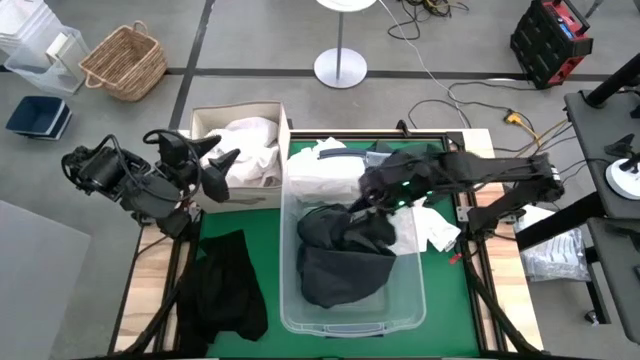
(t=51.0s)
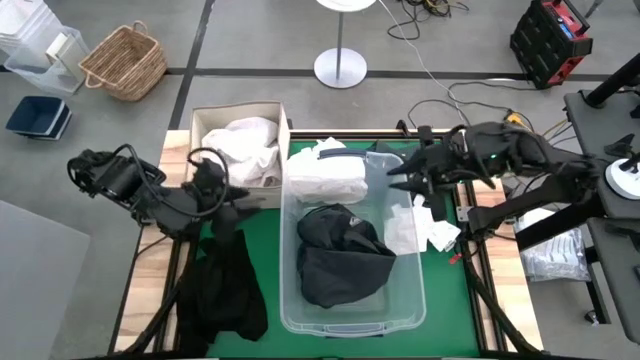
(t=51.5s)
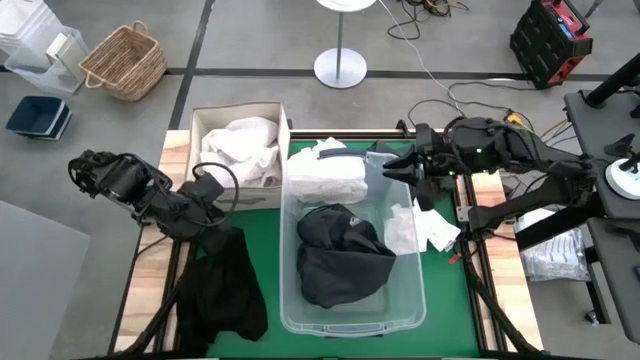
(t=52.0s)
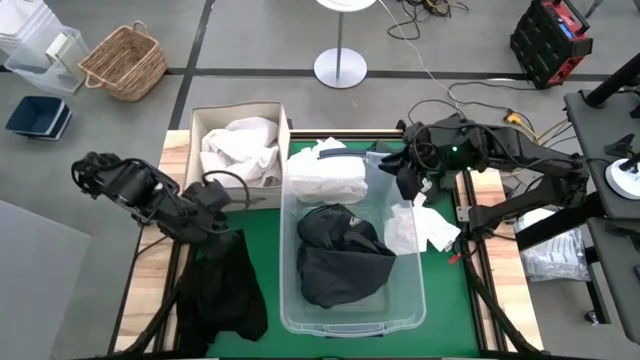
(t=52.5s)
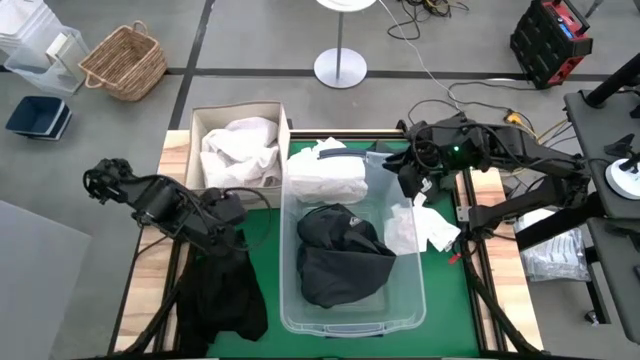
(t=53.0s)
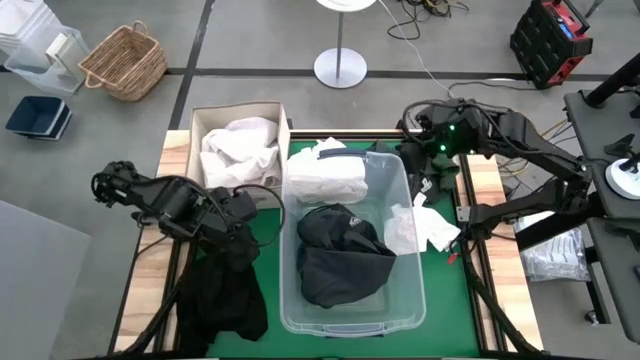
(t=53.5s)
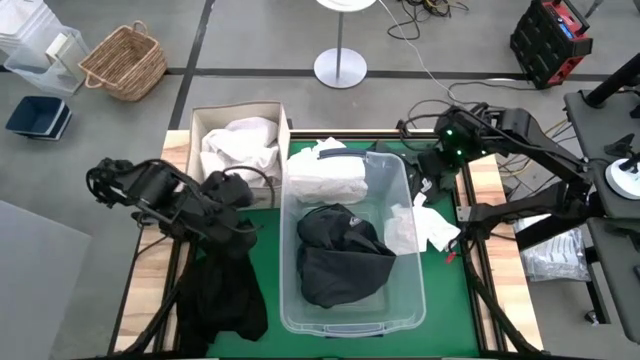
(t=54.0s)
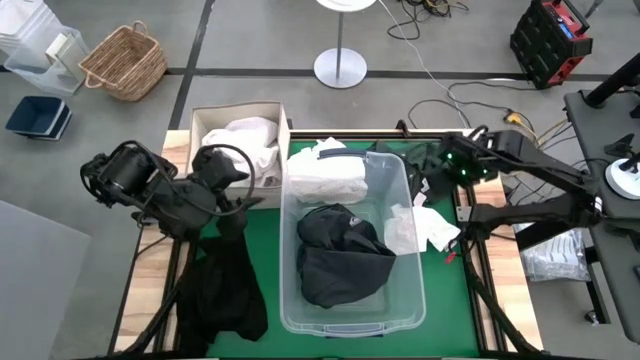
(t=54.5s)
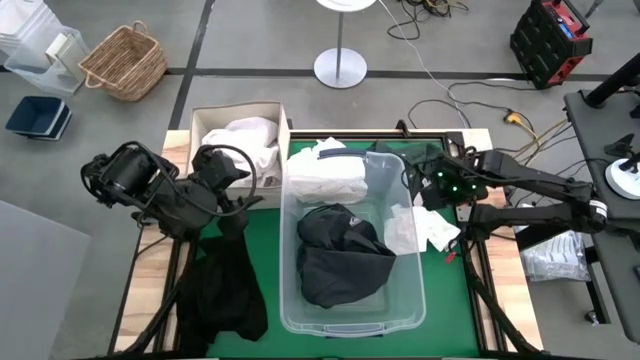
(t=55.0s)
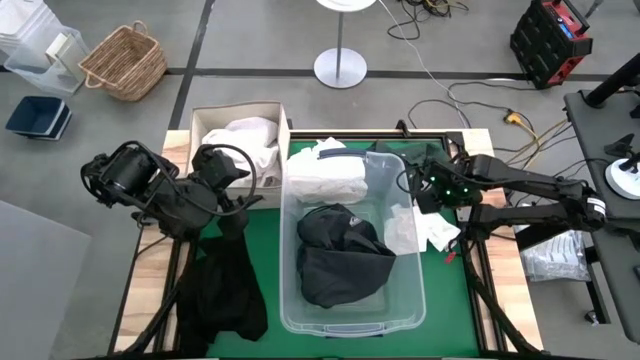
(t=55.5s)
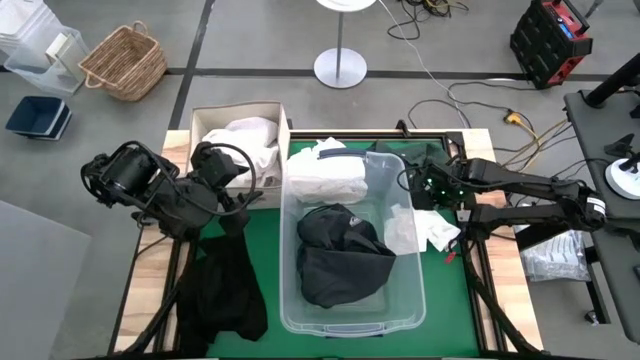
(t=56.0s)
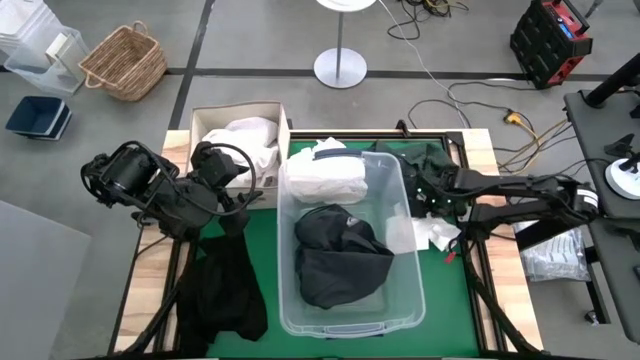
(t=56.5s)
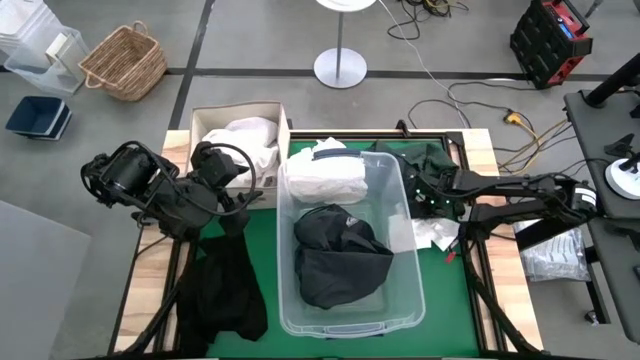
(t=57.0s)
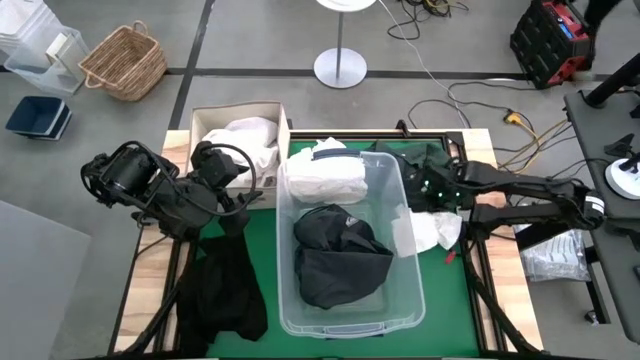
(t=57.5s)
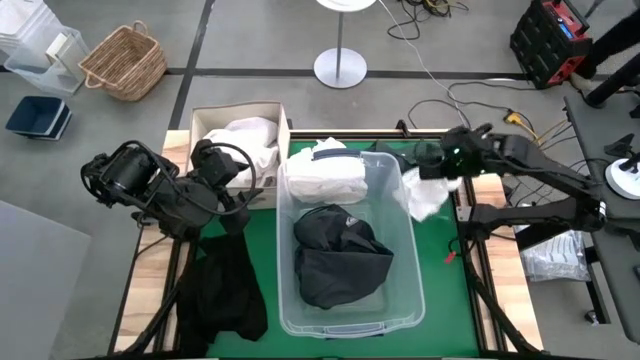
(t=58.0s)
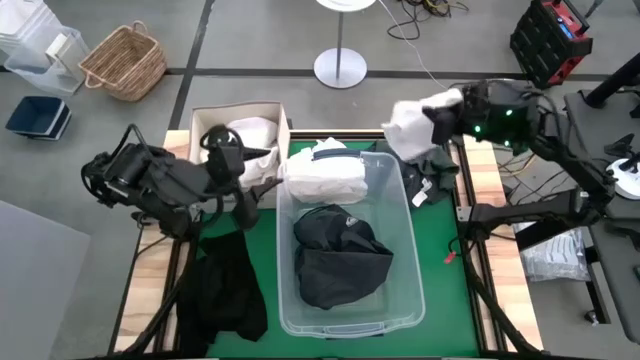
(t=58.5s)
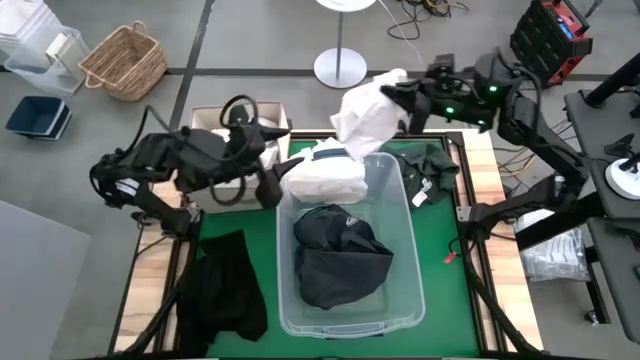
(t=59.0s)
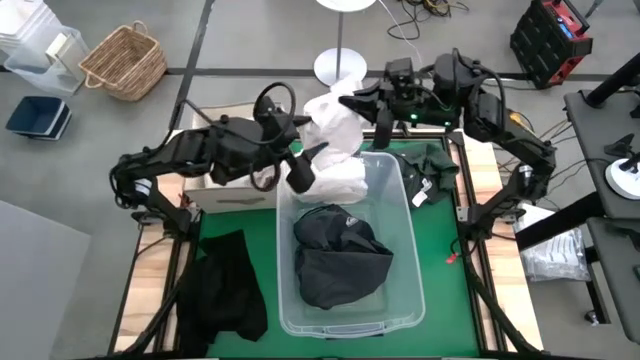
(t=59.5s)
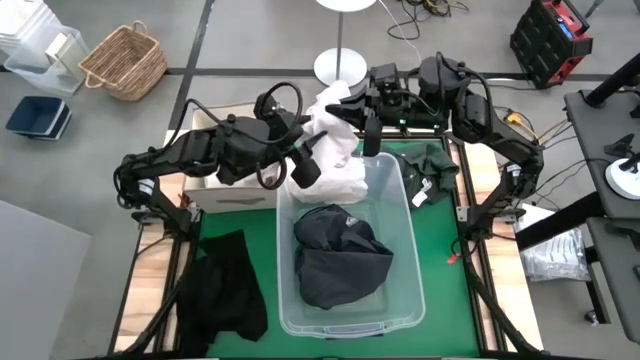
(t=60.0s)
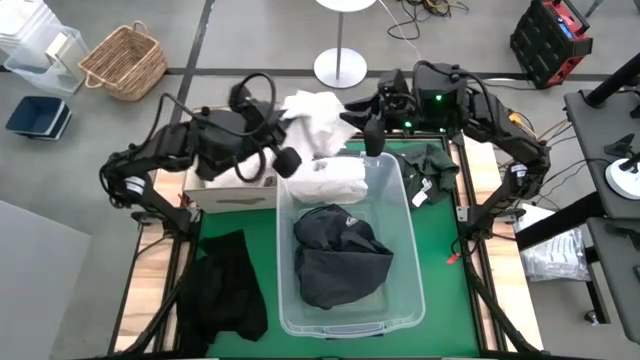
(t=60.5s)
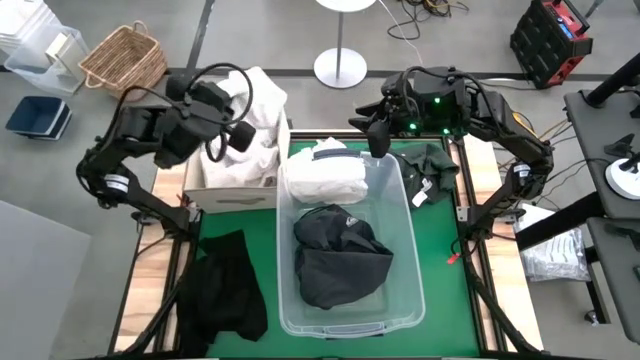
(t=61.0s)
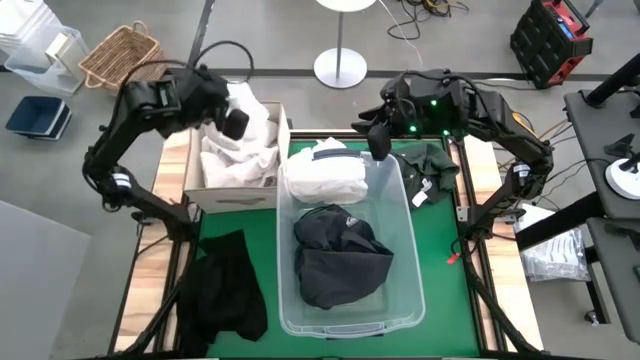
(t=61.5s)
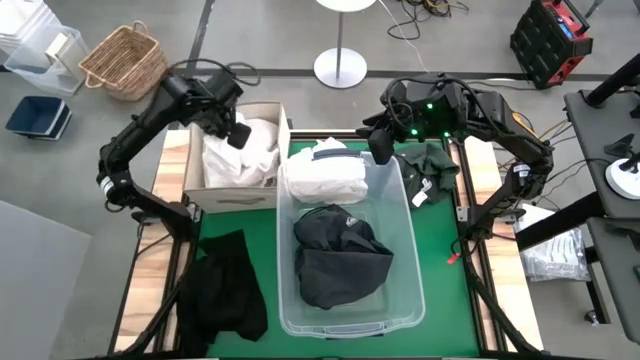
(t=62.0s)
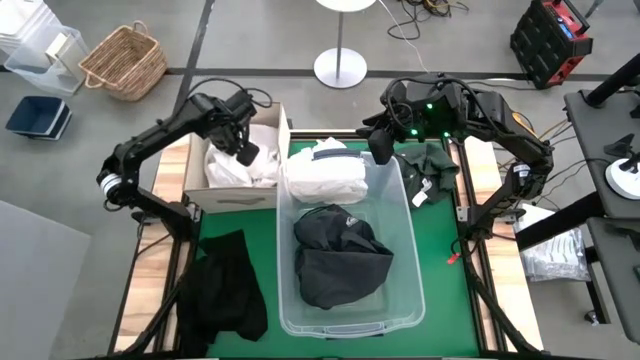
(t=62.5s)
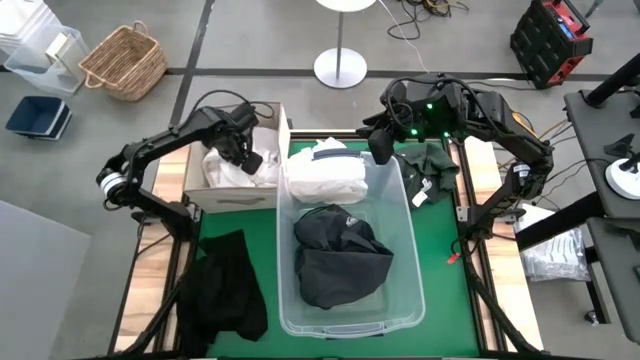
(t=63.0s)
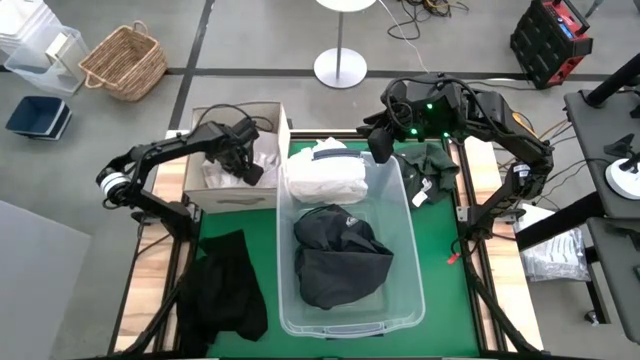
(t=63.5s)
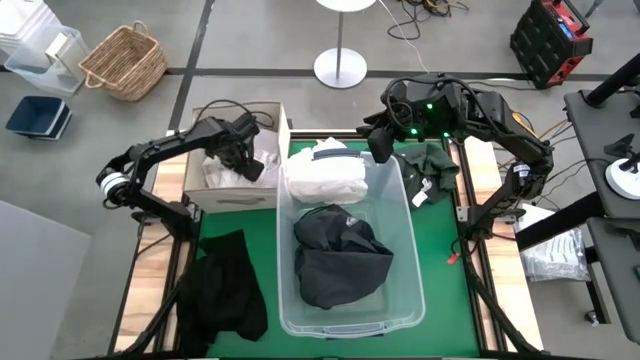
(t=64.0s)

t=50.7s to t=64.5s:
Task: Sort clothes
Put the white shorts into the white laundry organizer

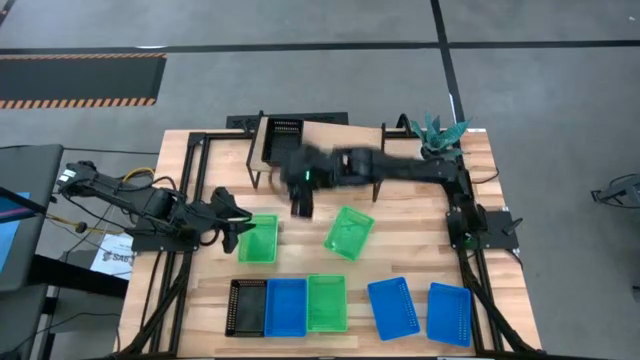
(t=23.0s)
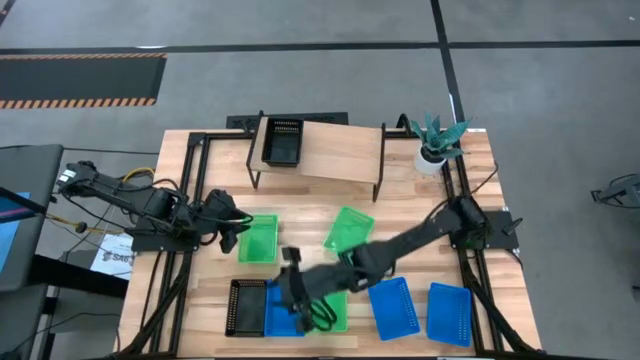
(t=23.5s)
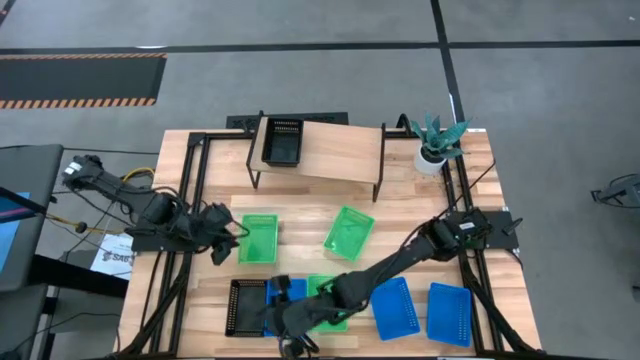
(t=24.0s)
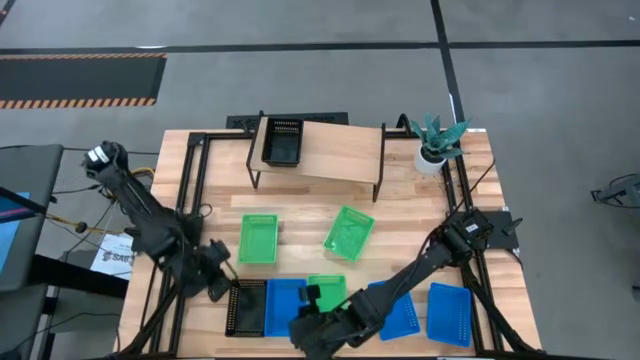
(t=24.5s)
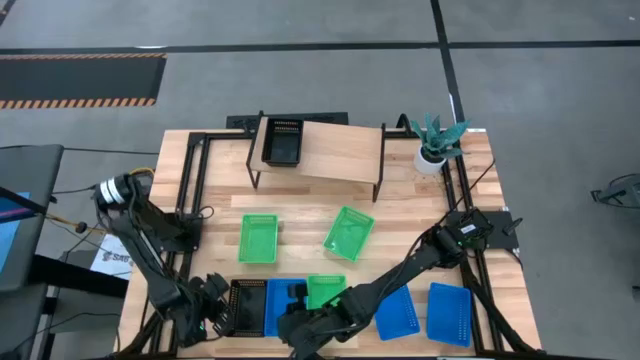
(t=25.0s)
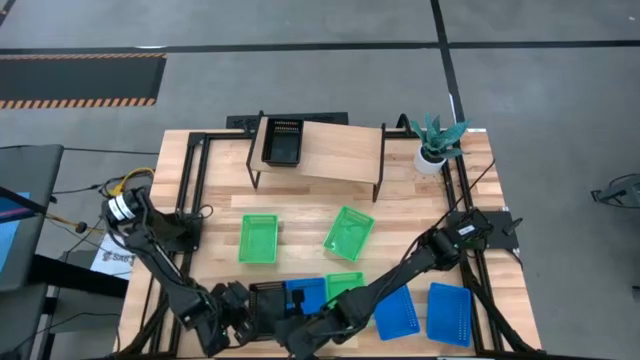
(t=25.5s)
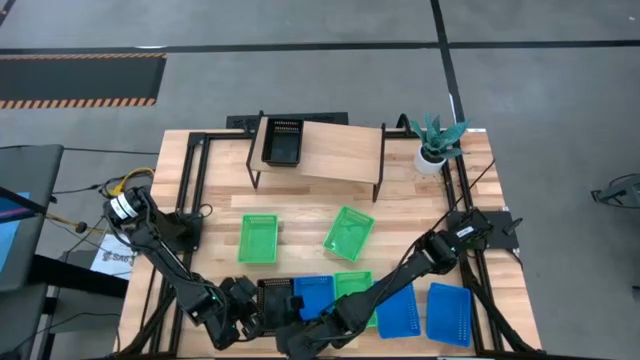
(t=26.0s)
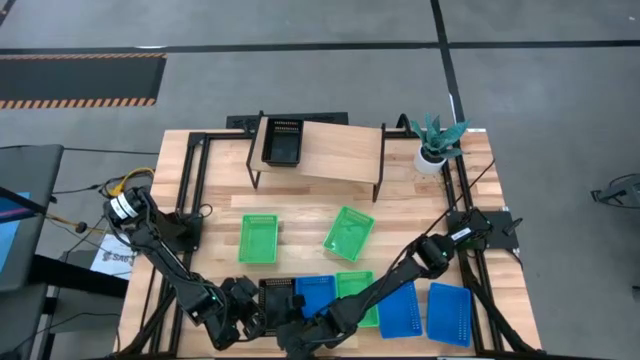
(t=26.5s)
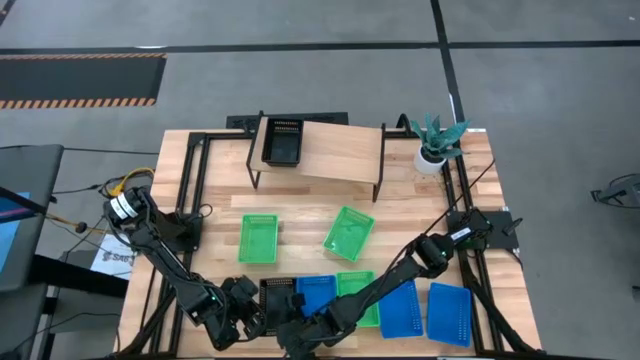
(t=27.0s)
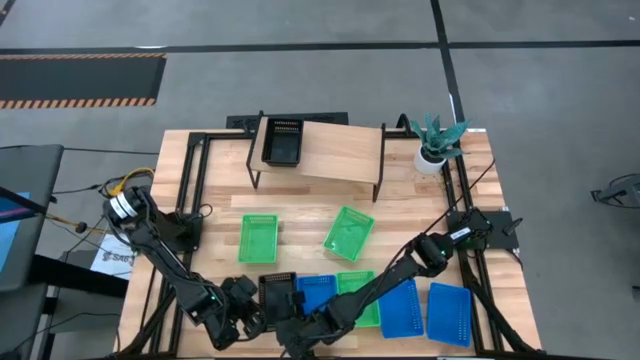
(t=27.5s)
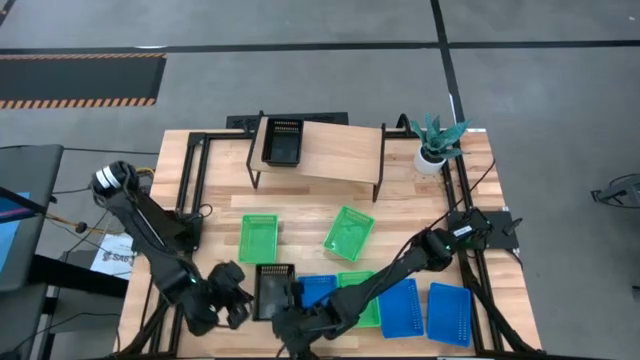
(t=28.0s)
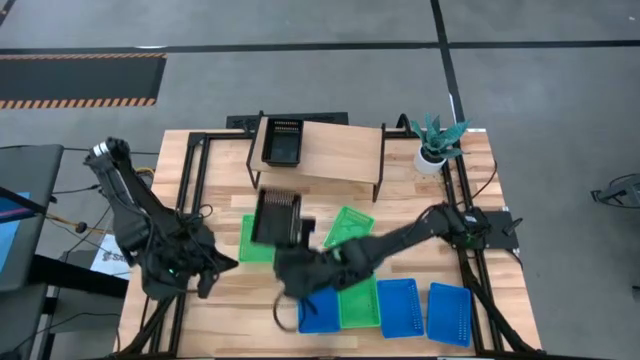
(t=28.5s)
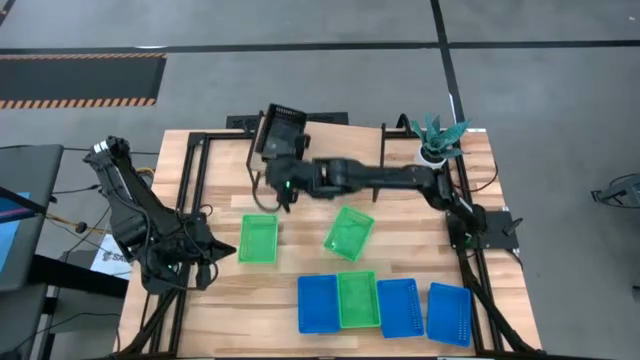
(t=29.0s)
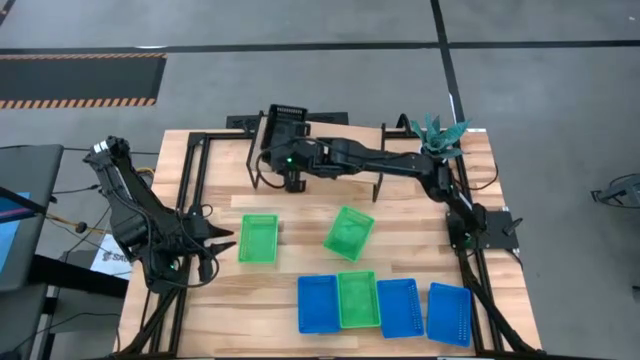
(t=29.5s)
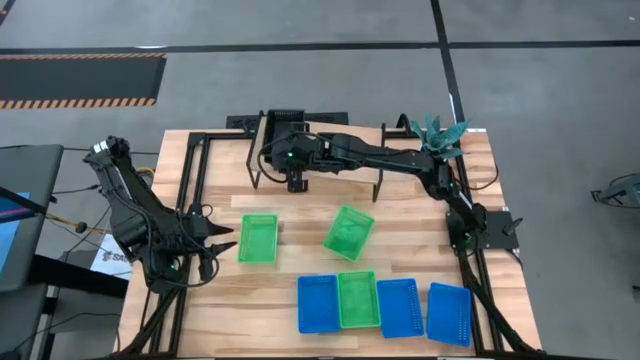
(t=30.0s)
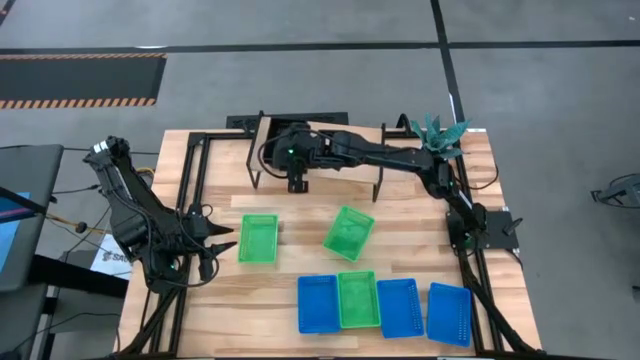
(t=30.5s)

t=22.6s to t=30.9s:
Task: Stack baskets on shelf by color
Stack the top black bin on the black bin on the shelf
